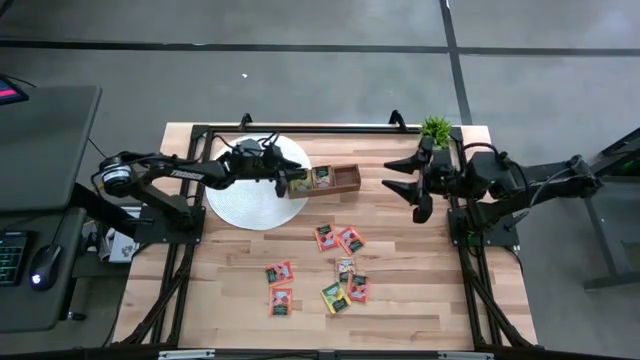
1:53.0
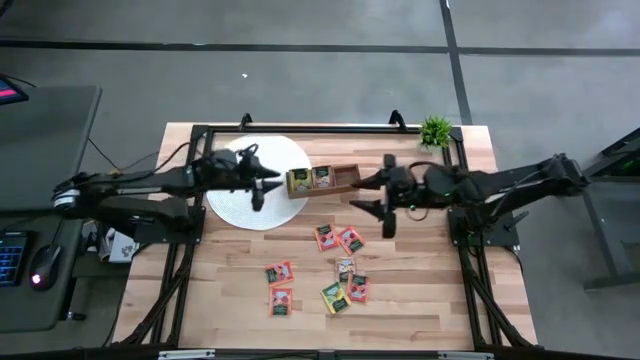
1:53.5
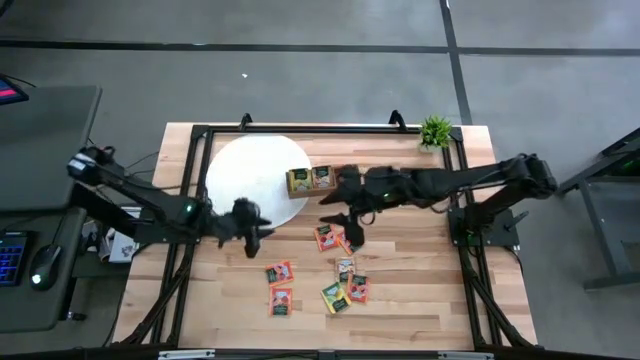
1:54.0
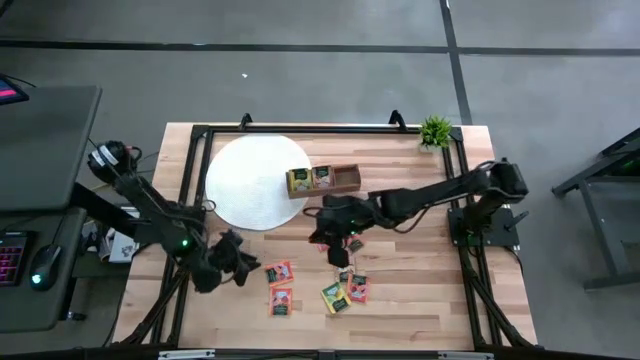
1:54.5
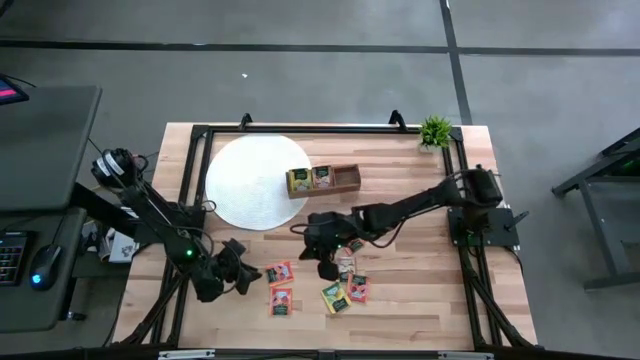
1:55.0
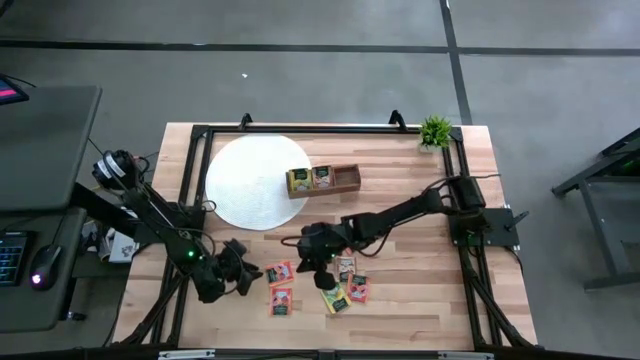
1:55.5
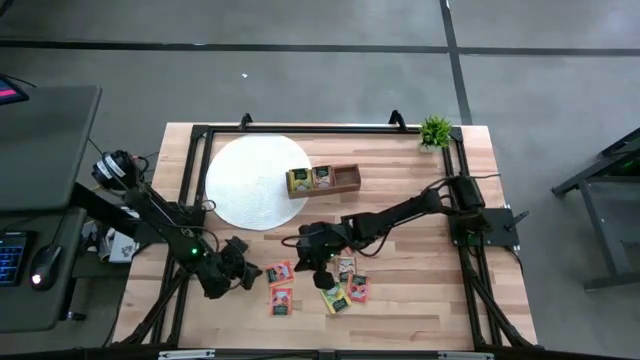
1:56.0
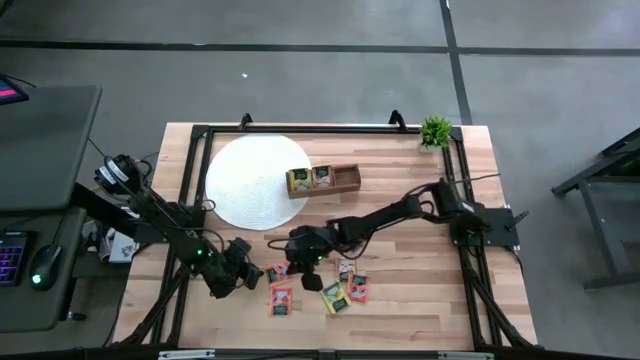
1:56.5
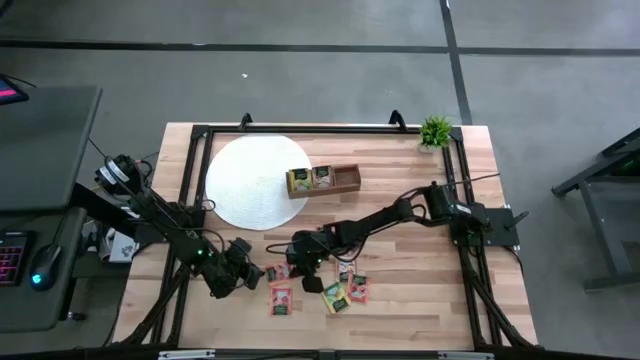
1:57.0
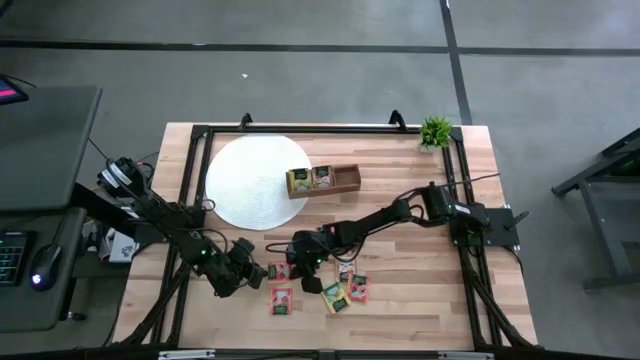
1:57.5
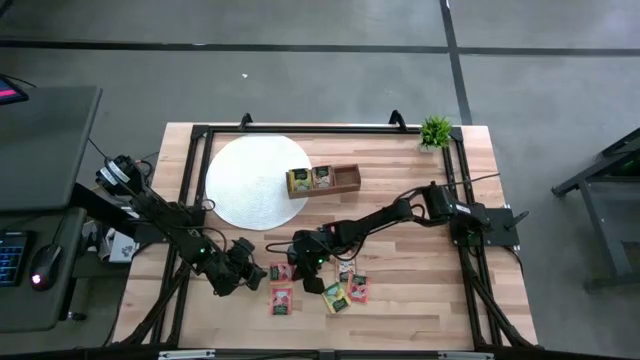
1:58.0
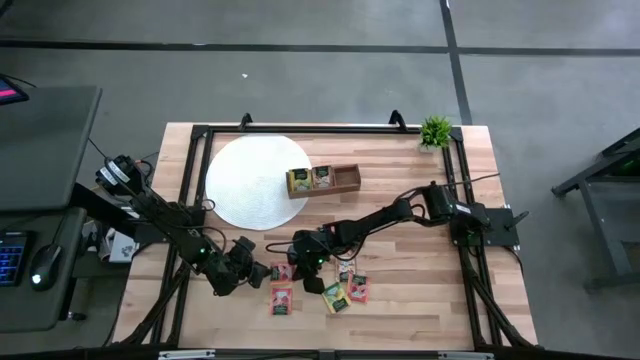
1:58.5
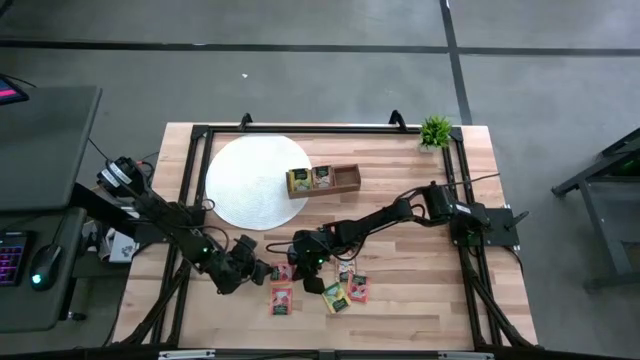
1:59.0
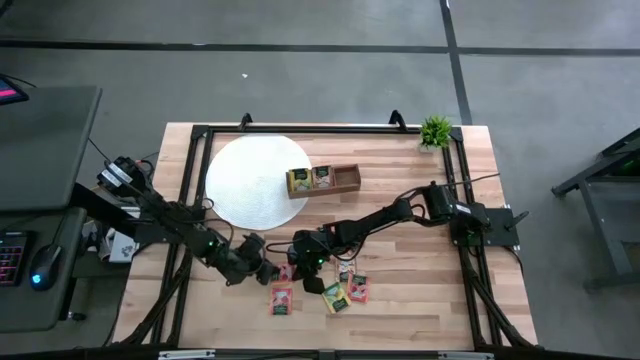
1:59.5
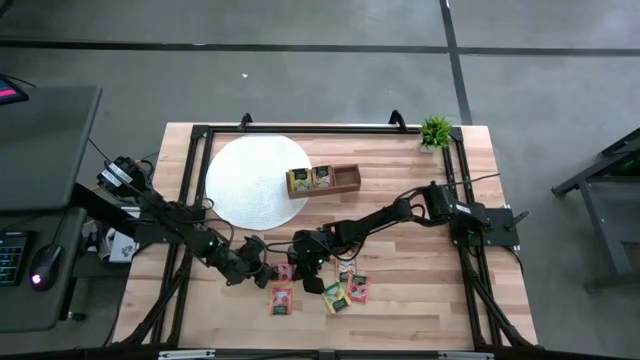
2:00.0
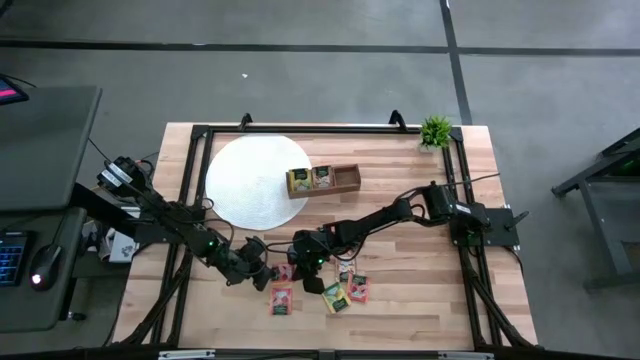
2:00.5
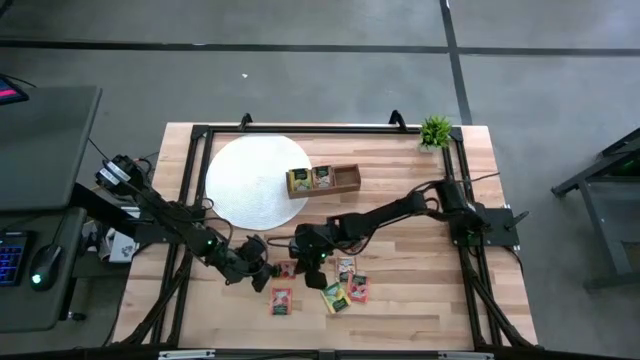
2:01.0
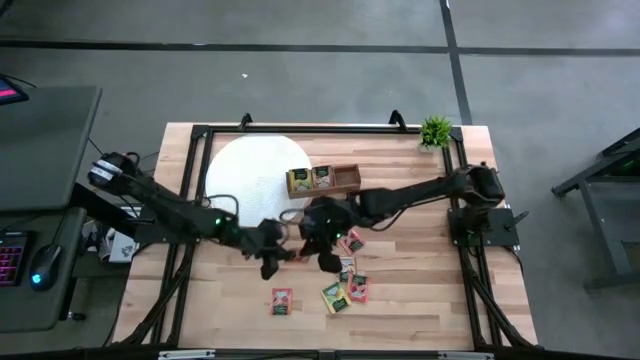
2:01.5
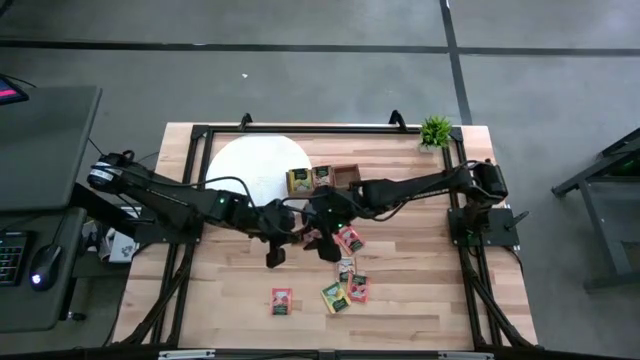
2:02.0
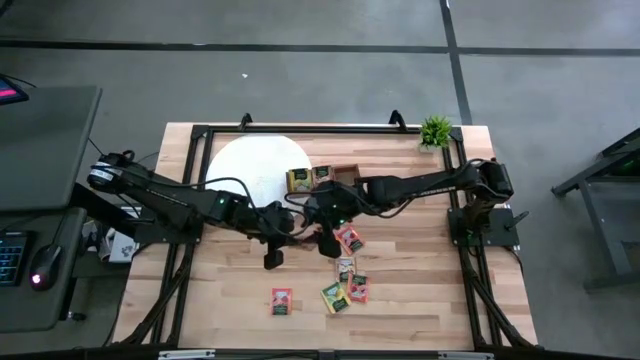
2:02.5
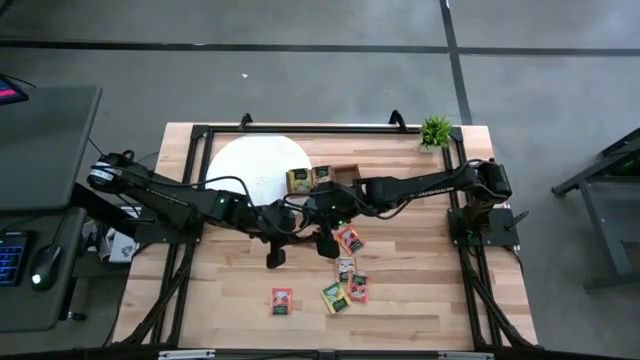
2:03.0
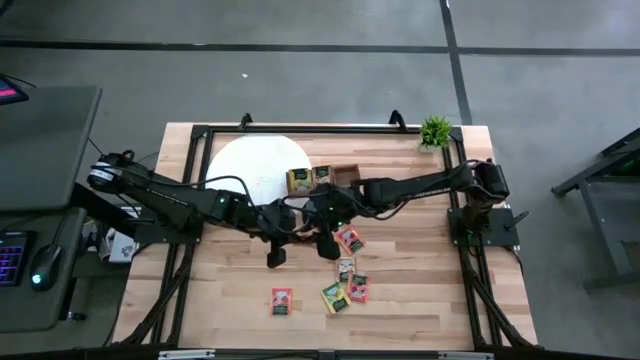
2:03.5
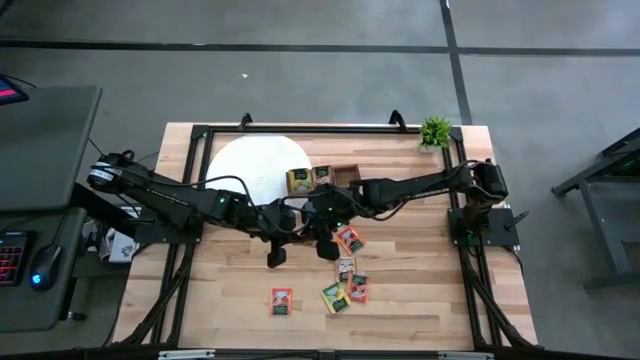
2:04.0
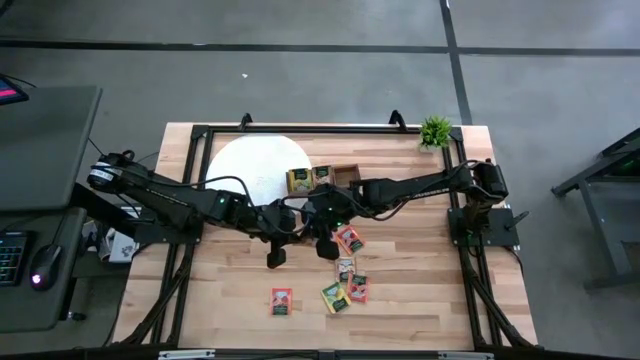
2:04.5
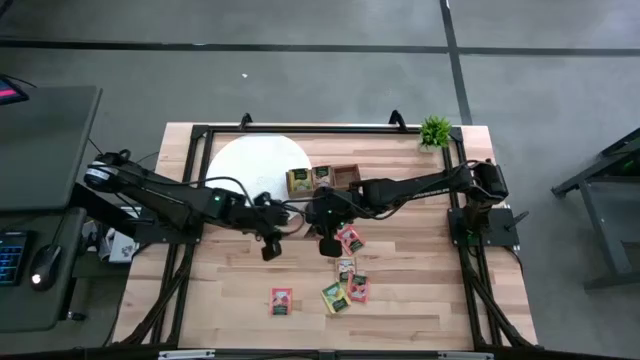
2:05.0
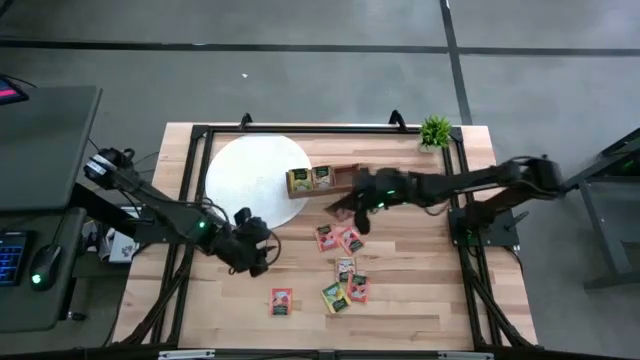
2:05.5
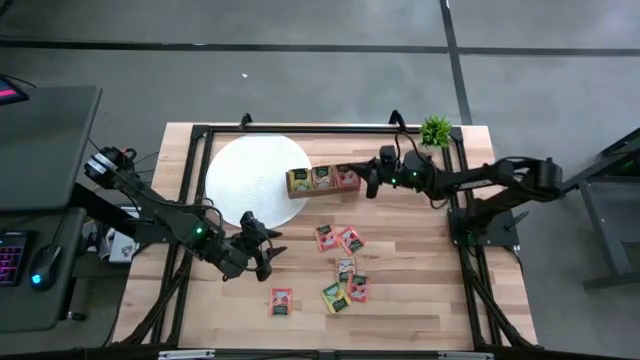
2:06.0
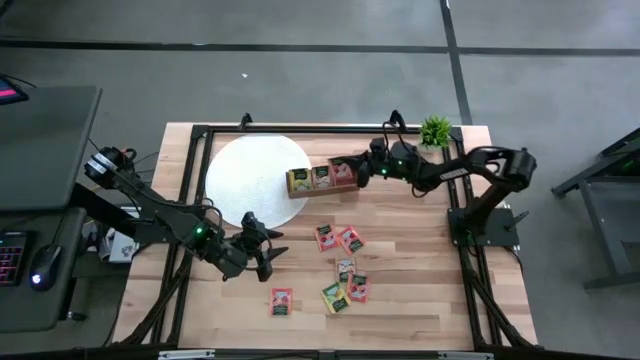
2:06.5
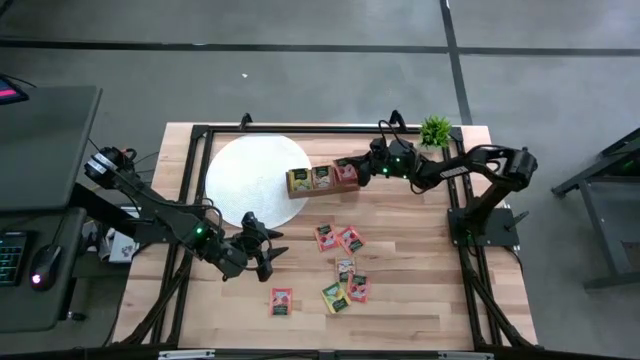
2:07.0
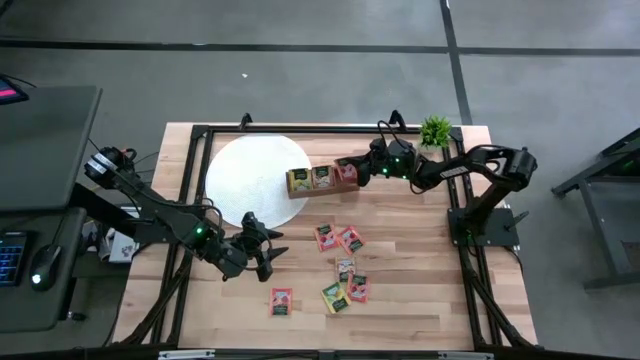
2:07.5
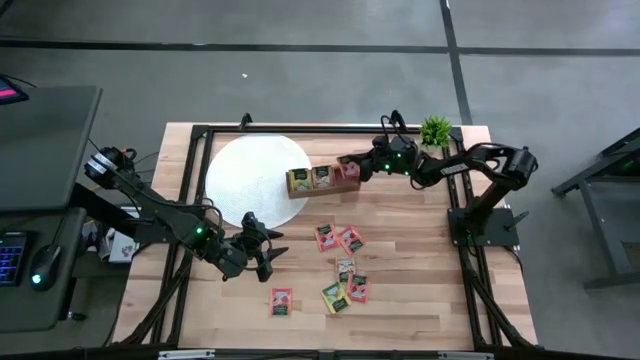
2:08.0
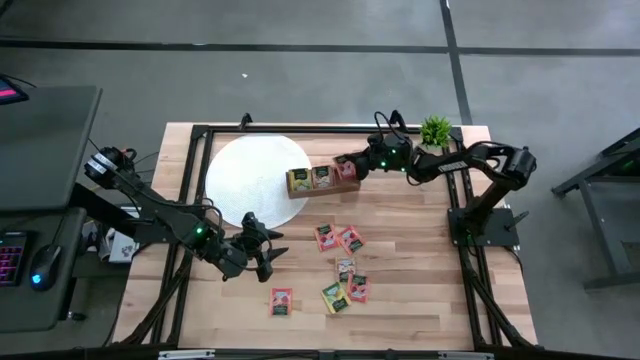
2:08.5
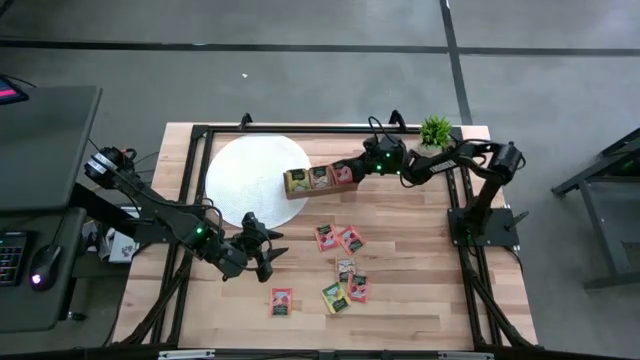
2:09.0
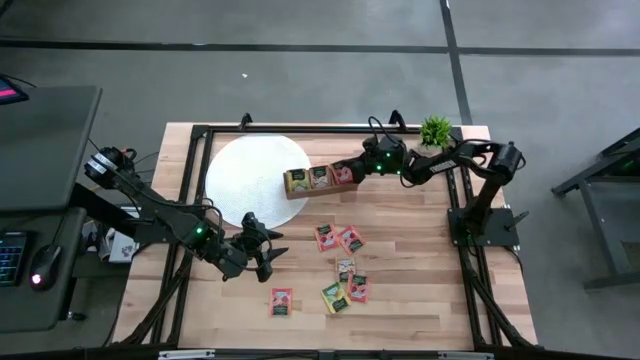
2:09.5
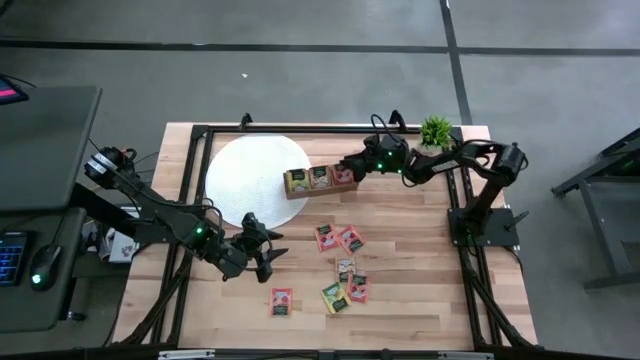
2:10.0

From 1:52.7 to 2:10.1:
Task: Pick & Place Tea
Put the orange tea bag into the right compartment of the wooden organizer
